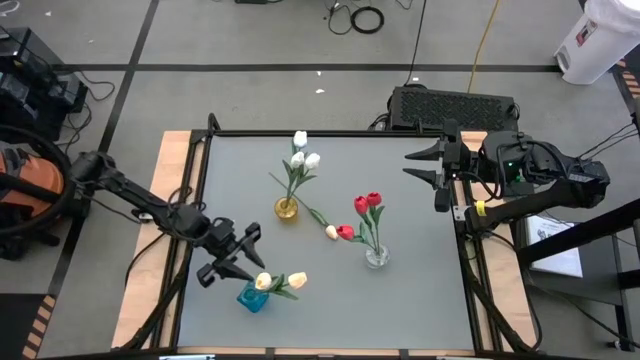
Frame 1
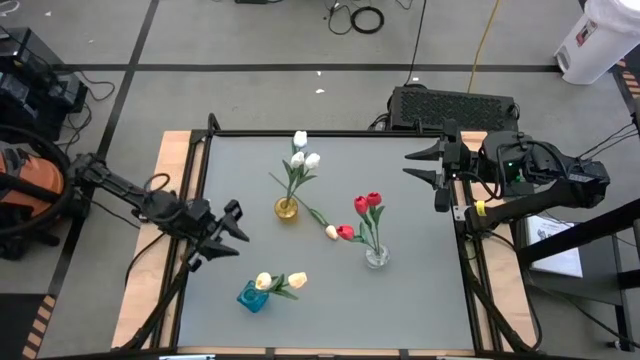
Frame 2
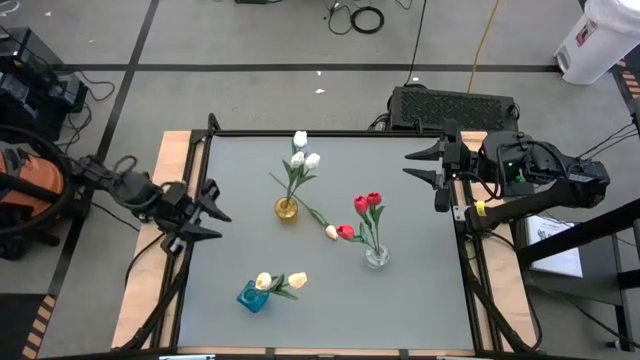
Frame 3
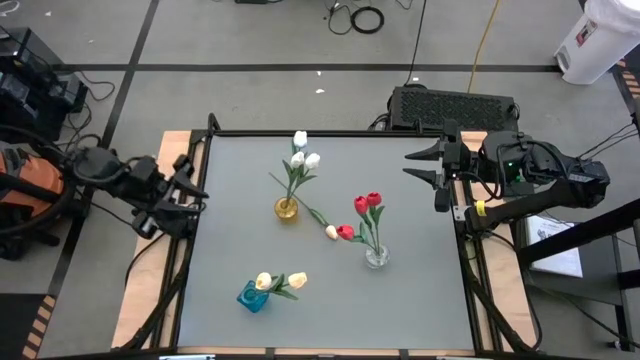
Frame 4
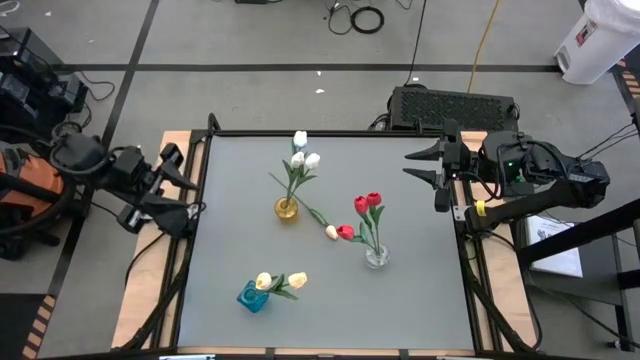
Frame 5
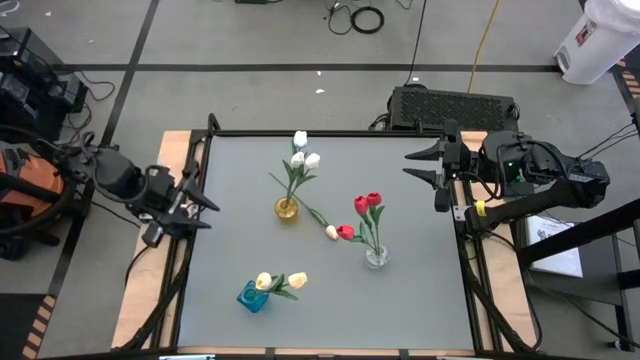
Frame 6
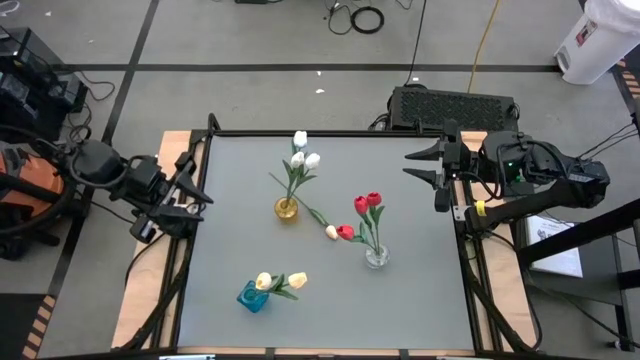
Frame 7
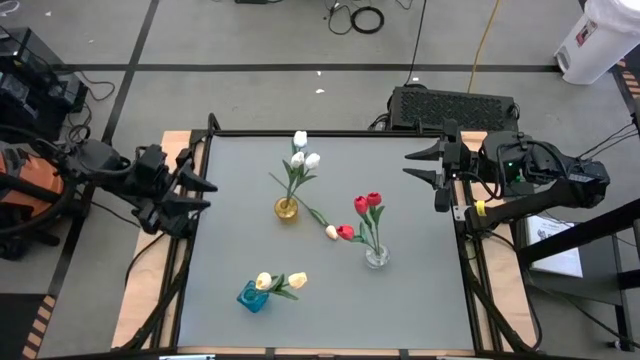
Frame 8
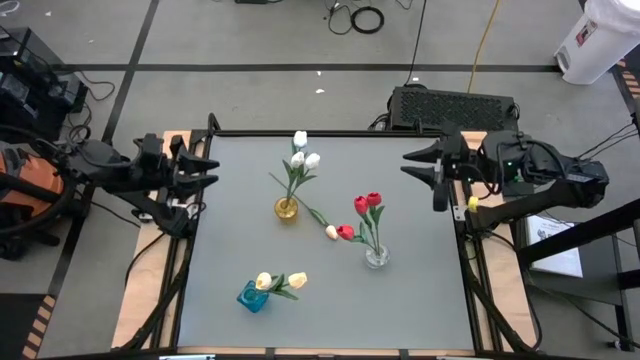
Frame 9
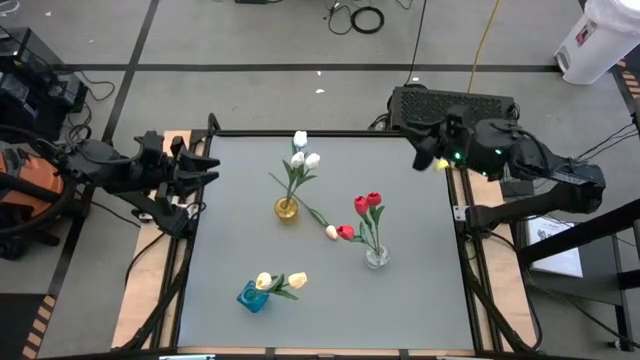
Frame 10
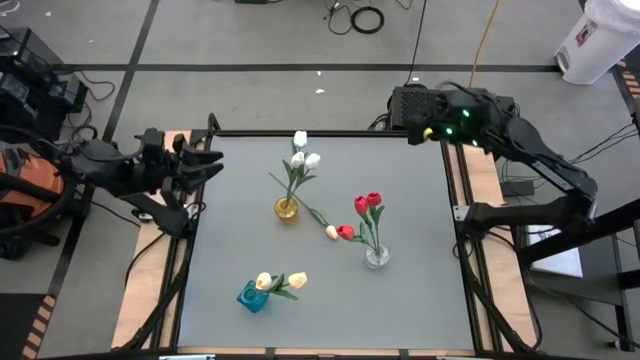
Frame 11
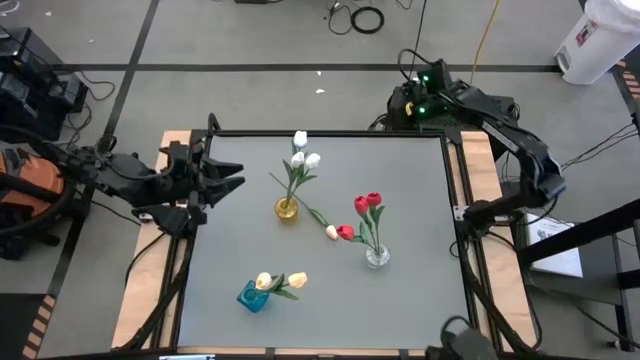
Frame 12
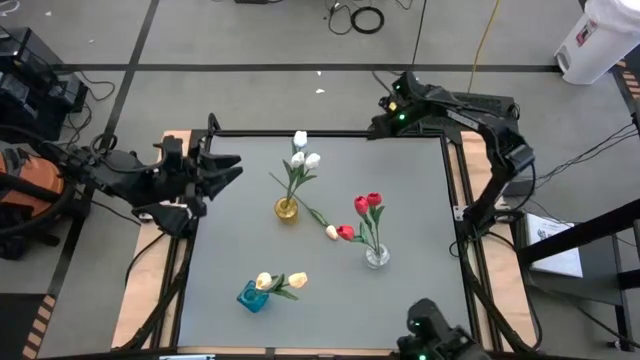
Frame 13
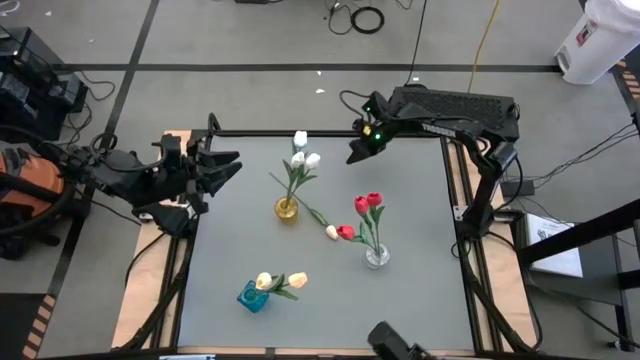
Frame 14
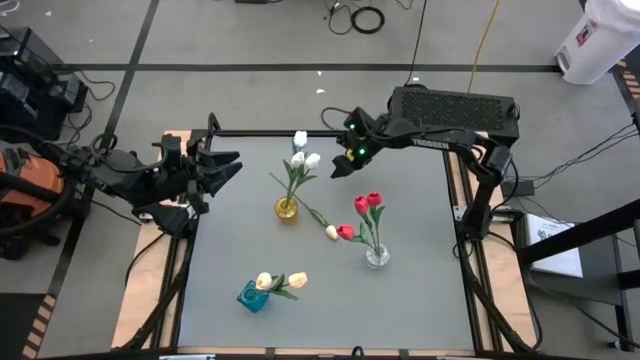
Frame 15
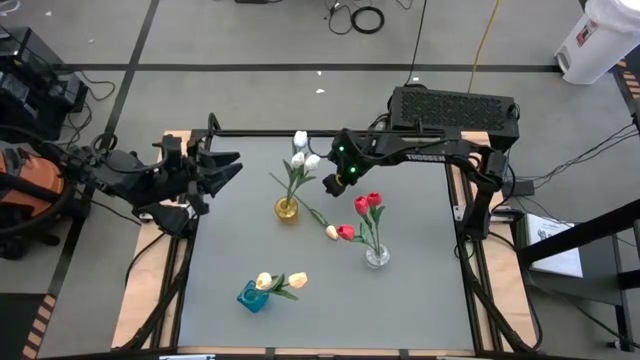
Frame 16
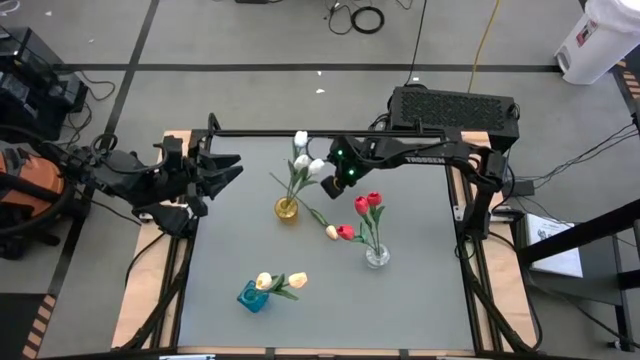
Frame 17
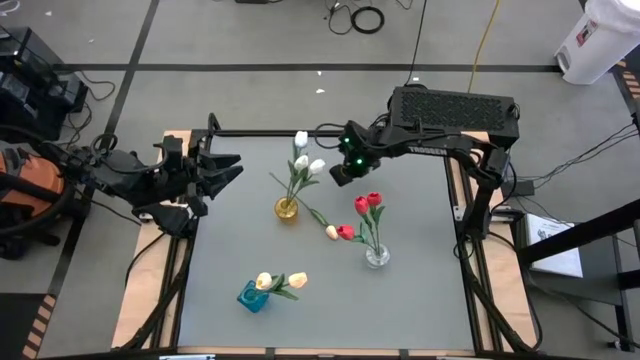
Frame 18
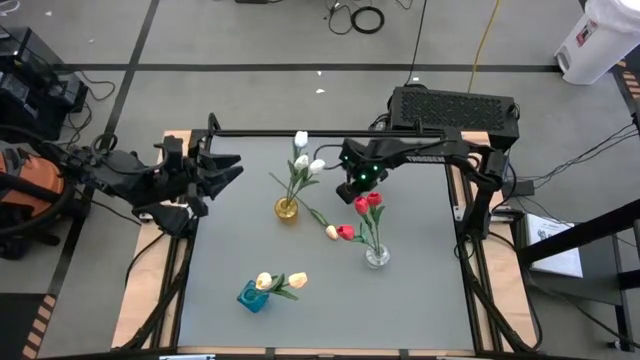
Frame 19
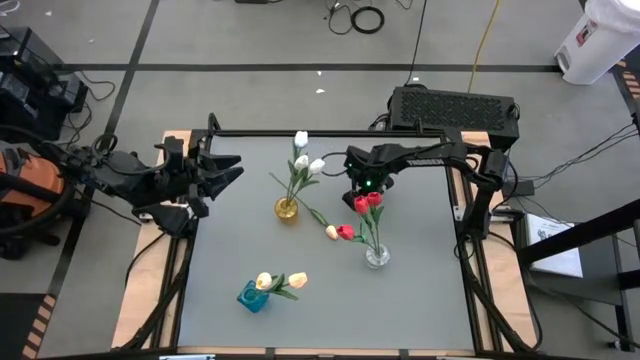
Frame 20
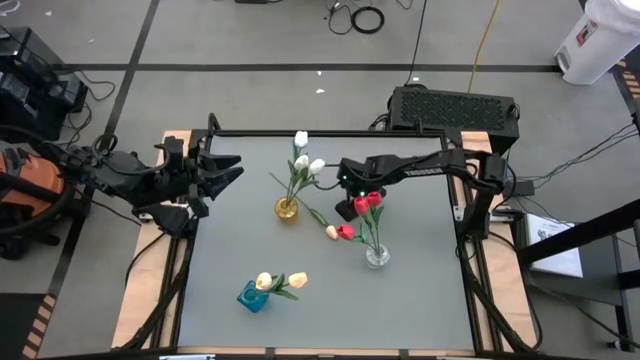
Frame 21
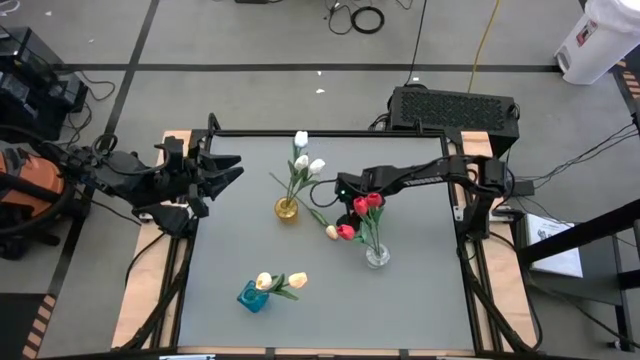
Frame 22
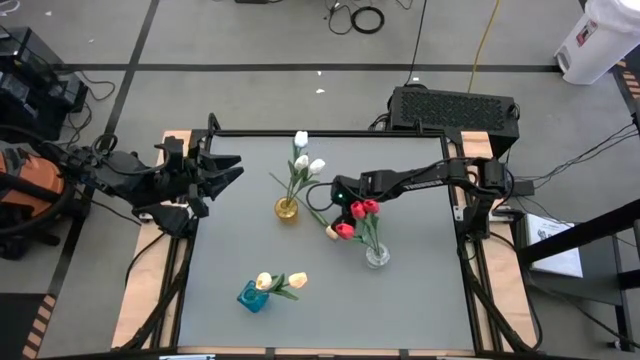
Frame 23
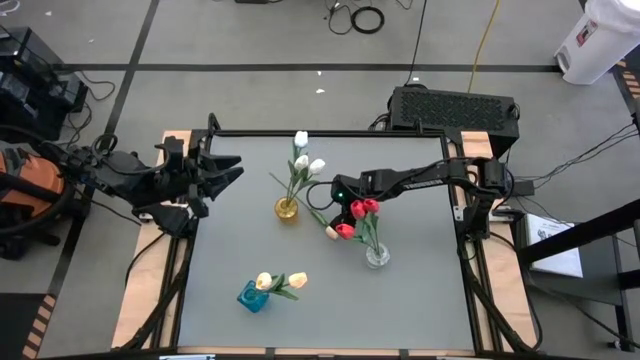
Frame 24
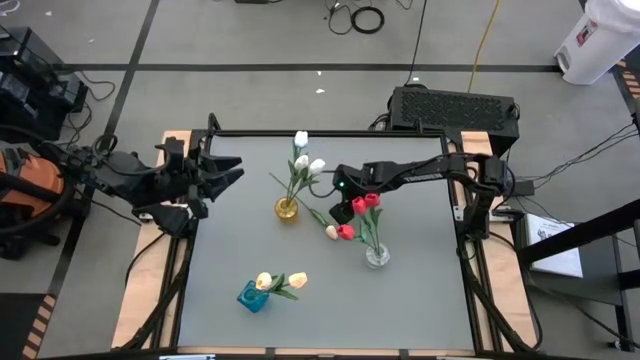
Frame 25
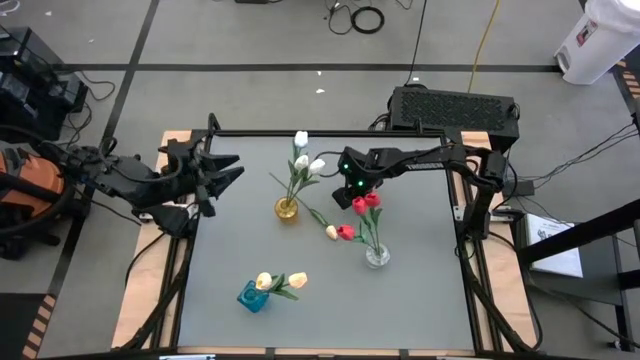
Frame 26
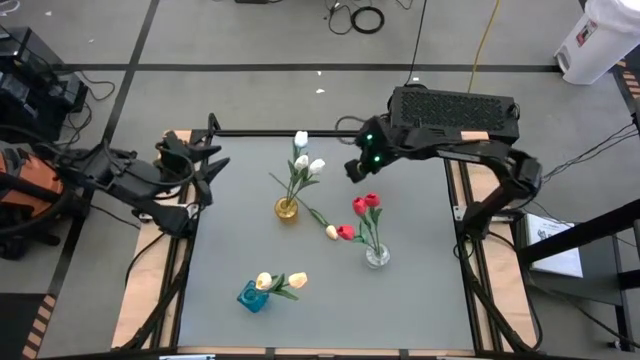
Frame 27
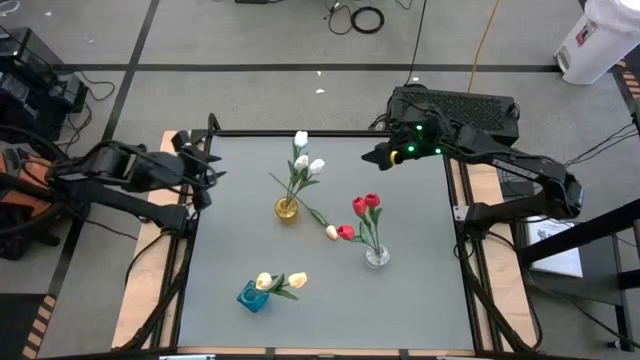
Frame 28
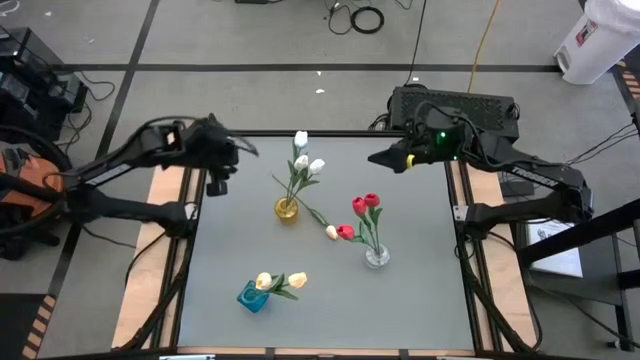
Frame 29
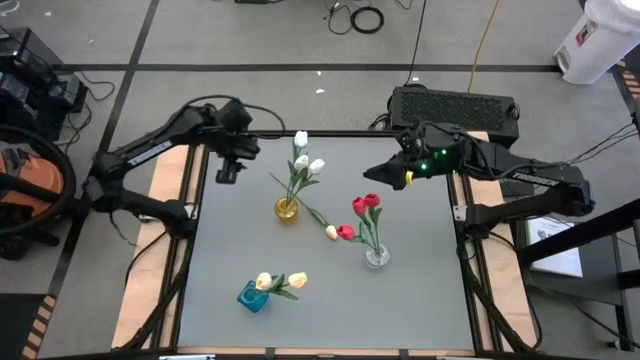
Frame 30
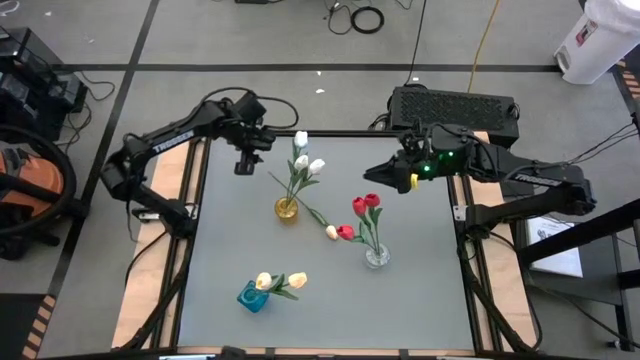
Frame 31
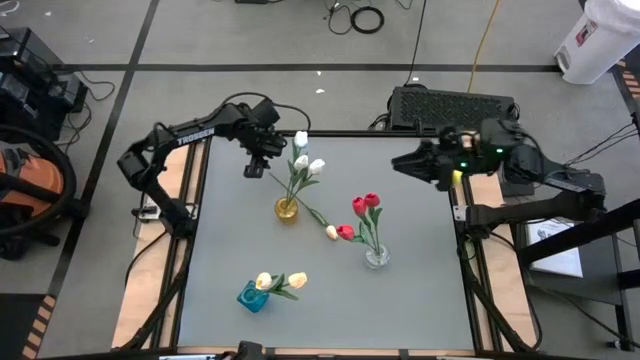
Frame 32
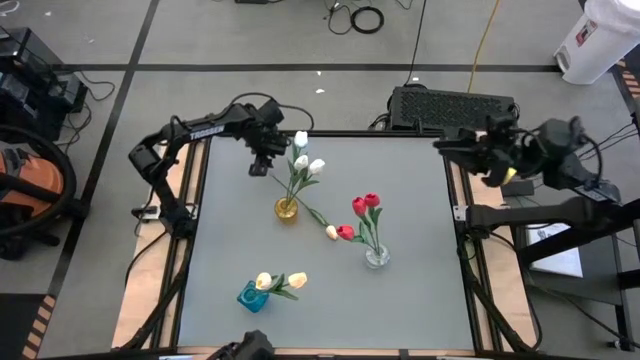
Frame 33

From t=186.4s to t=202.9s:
Task: Sort flowers into vase by color
Put the yellow tulip into the blue vase

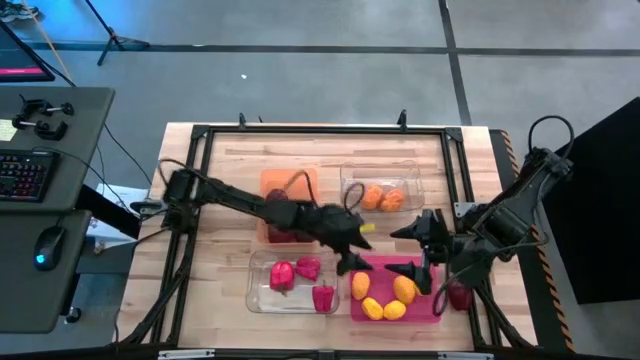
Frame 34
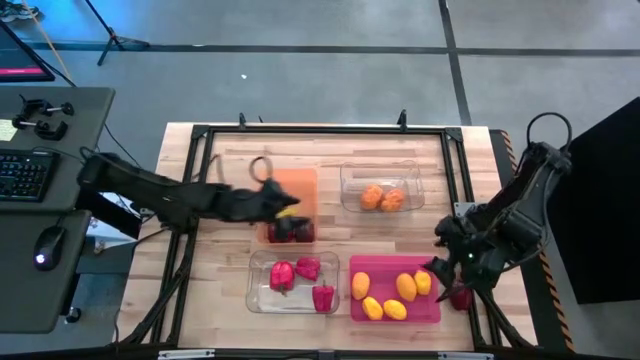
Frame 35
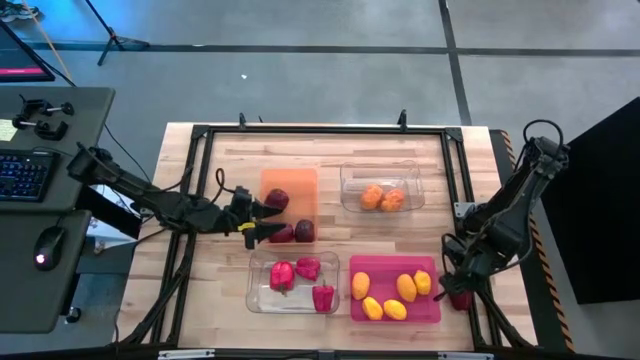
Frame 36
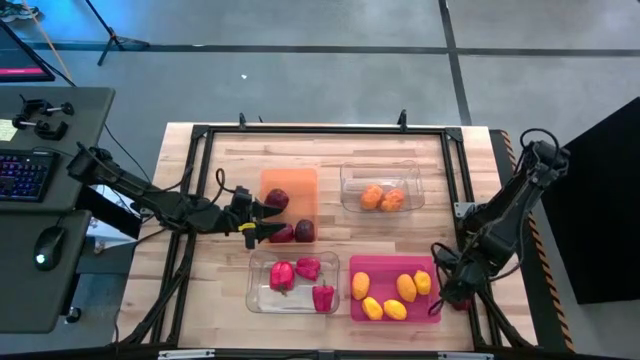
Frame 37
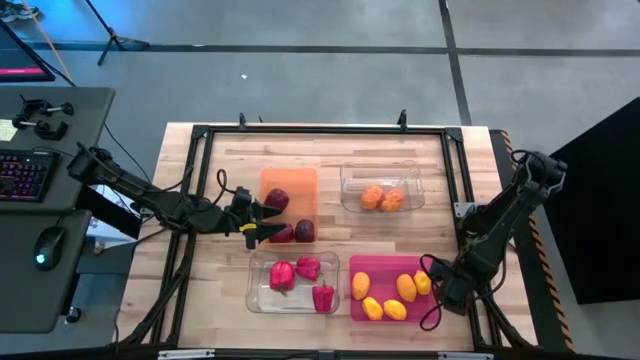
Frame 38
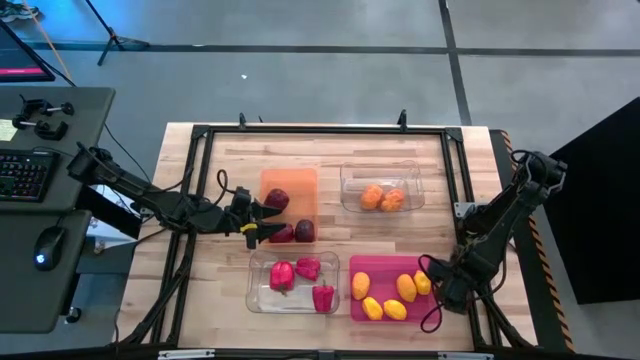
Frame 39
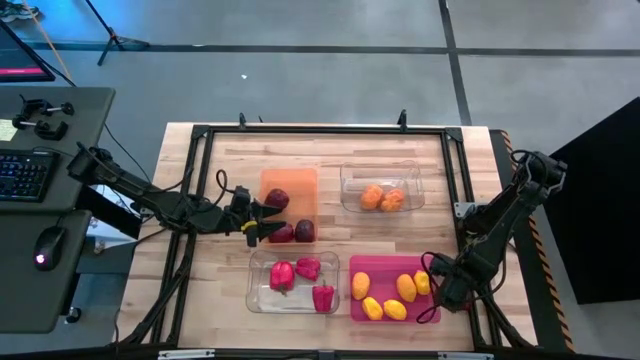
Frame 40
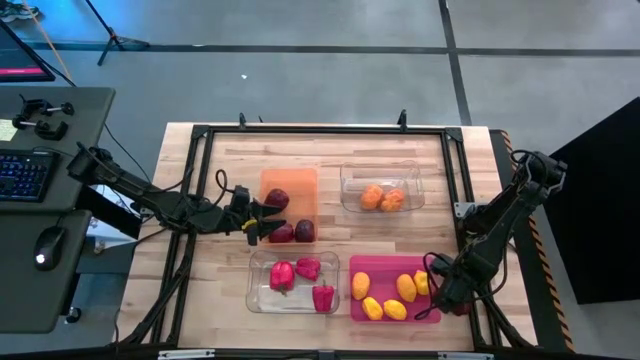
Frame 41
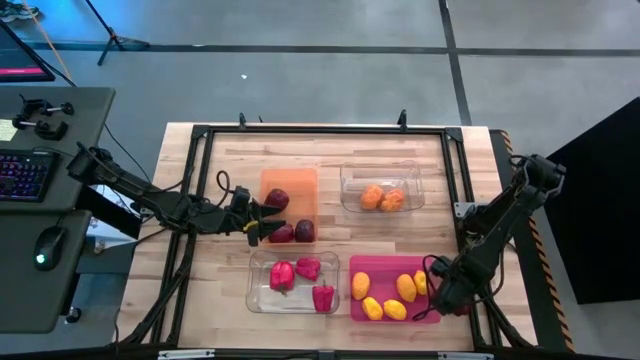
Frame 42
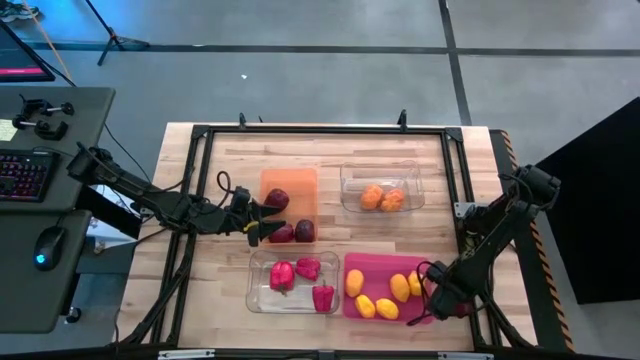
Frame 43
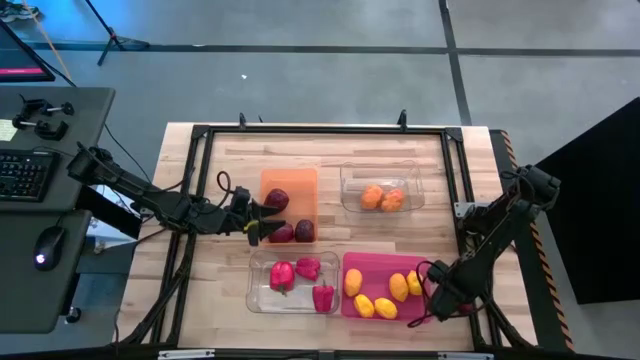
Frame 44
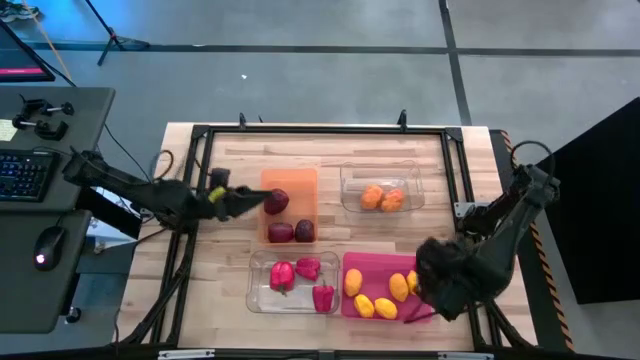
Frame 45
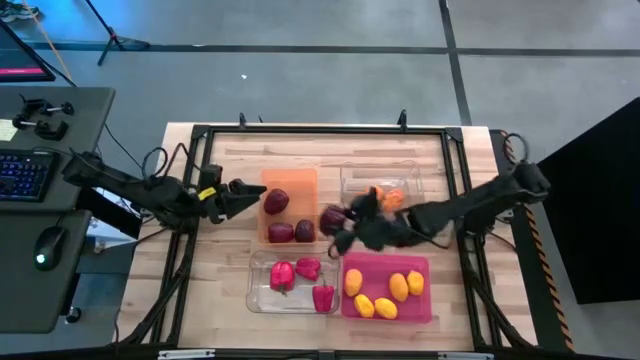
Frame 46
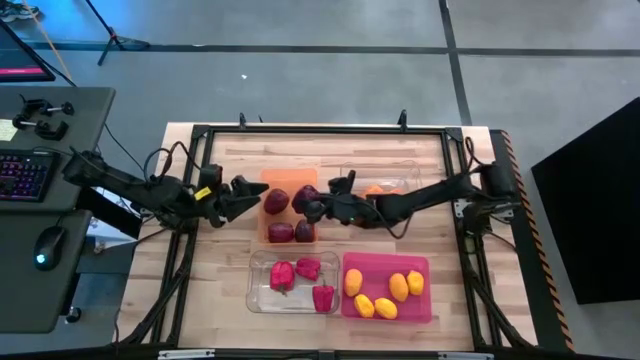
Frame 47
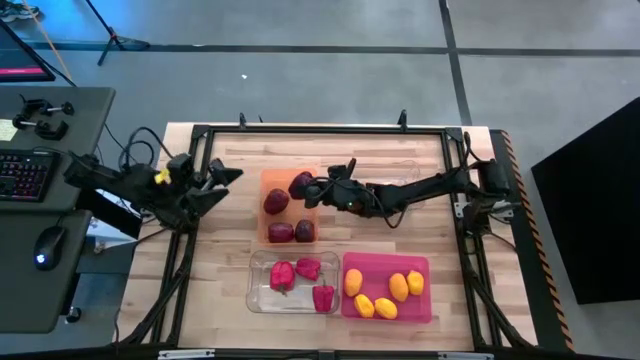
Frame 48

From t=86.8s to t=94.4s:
Task: Sort produce into baskets
Put the apple into the orange bin
